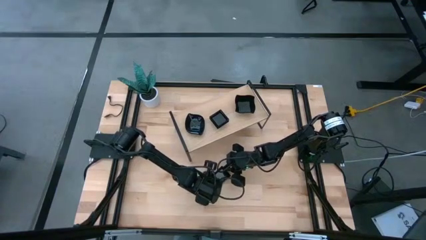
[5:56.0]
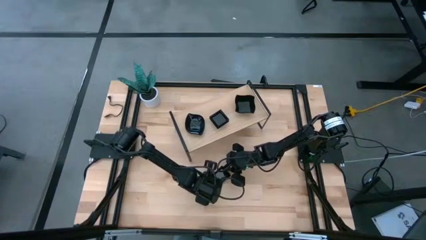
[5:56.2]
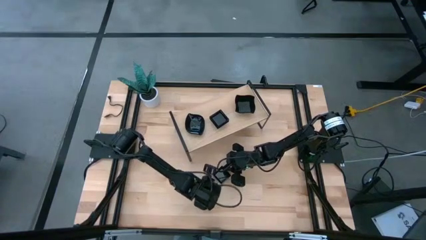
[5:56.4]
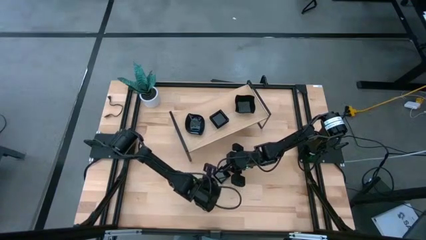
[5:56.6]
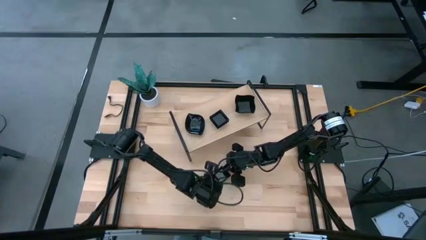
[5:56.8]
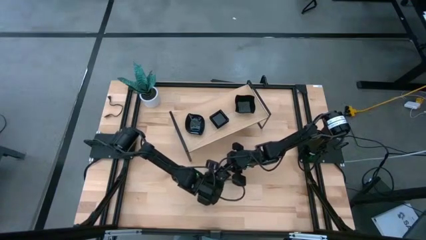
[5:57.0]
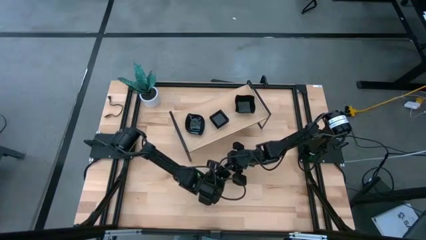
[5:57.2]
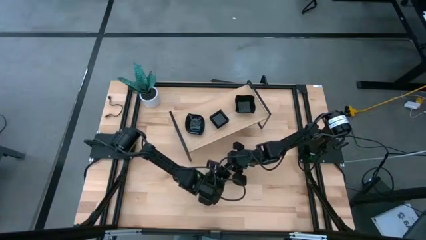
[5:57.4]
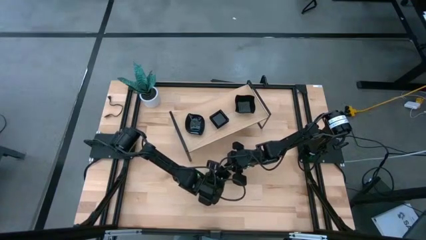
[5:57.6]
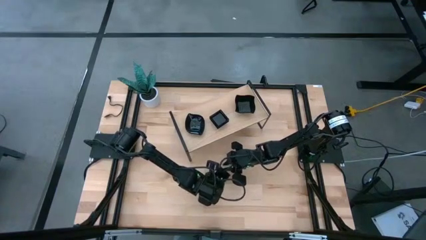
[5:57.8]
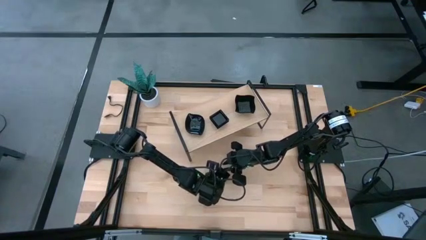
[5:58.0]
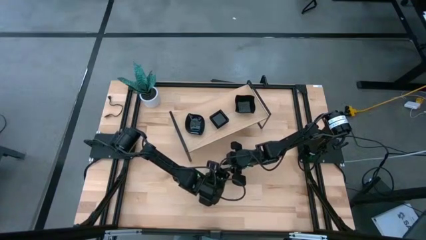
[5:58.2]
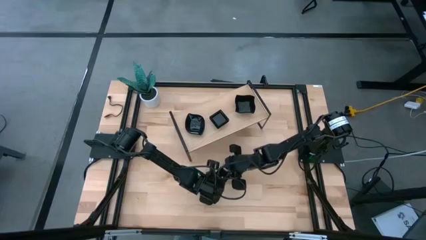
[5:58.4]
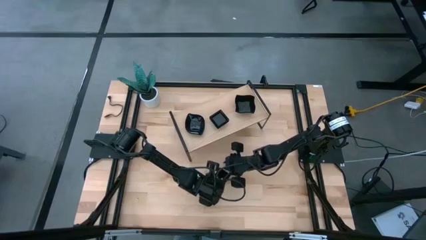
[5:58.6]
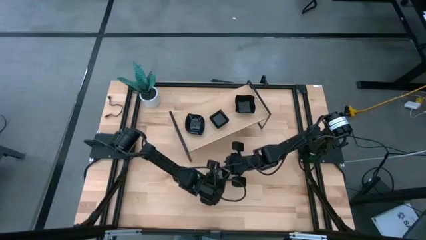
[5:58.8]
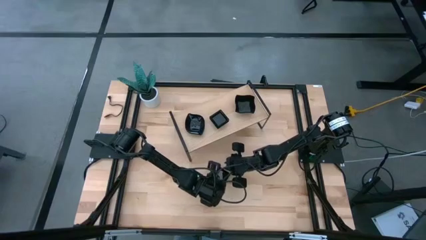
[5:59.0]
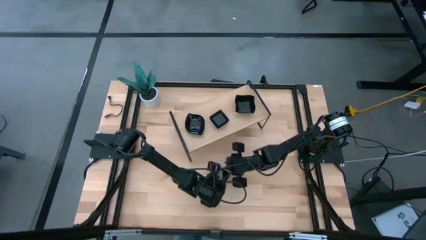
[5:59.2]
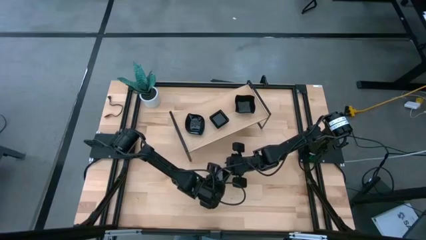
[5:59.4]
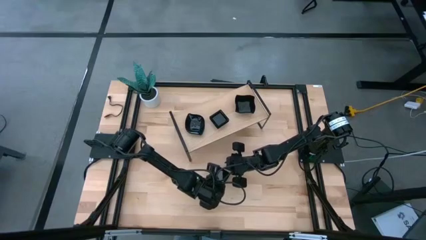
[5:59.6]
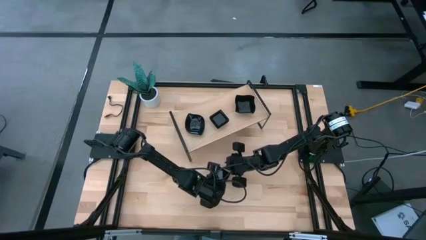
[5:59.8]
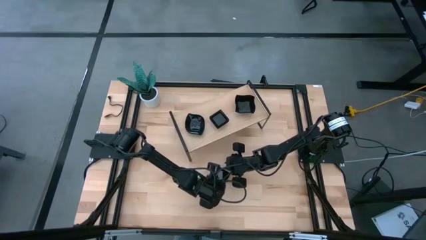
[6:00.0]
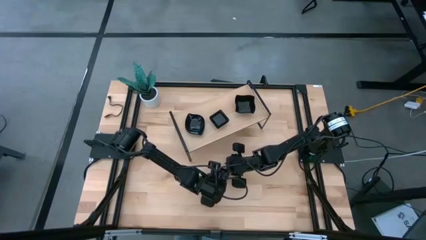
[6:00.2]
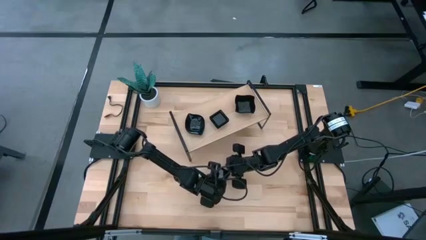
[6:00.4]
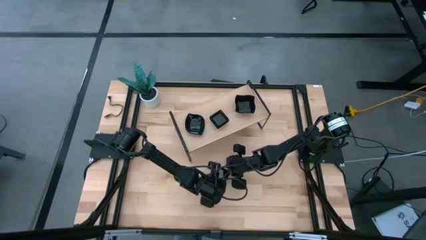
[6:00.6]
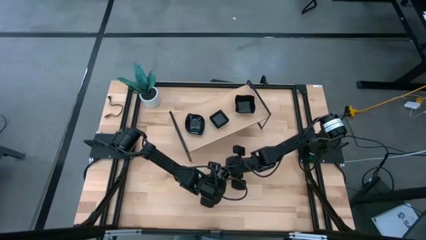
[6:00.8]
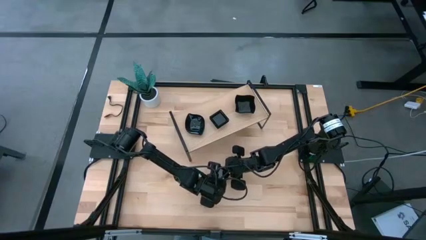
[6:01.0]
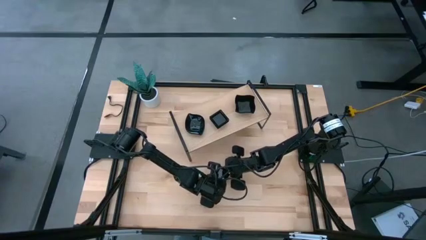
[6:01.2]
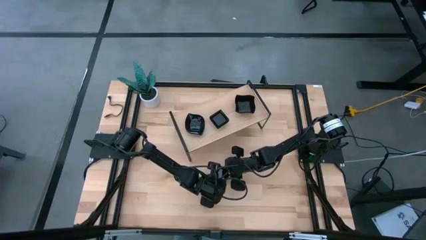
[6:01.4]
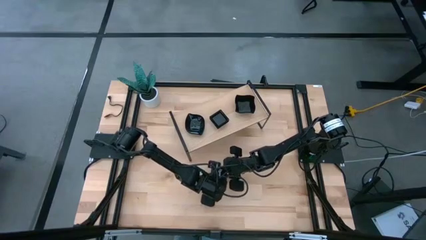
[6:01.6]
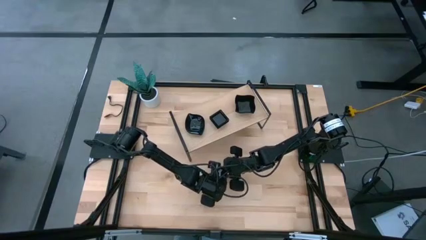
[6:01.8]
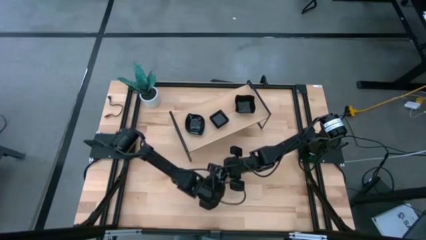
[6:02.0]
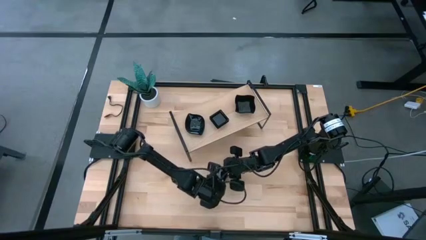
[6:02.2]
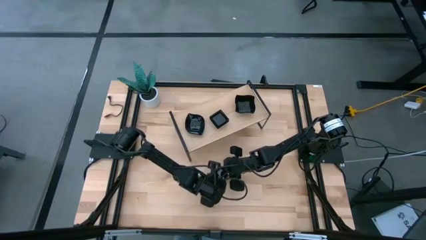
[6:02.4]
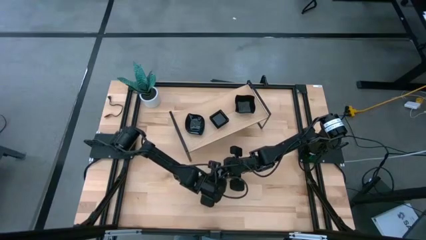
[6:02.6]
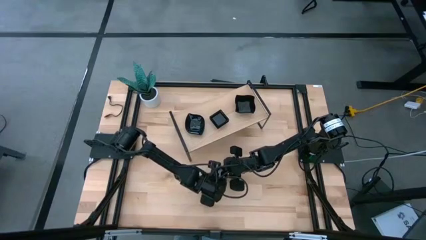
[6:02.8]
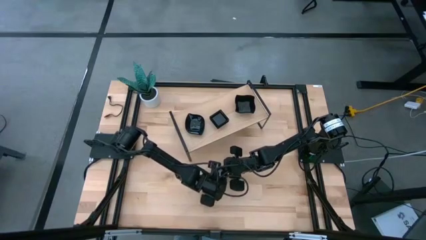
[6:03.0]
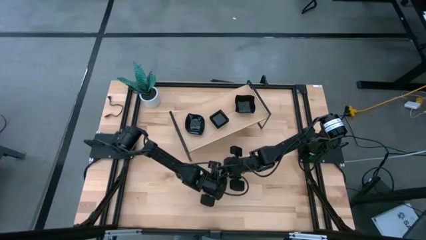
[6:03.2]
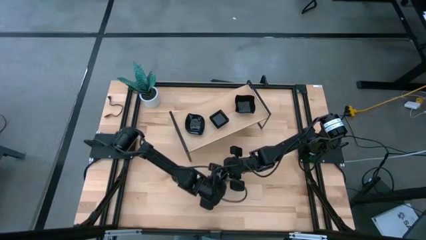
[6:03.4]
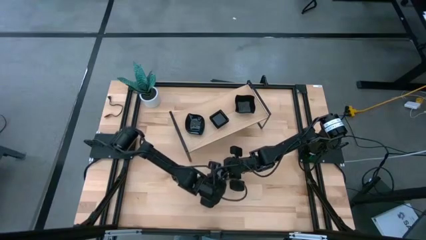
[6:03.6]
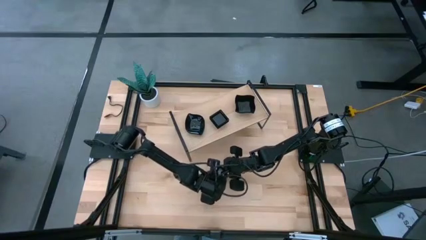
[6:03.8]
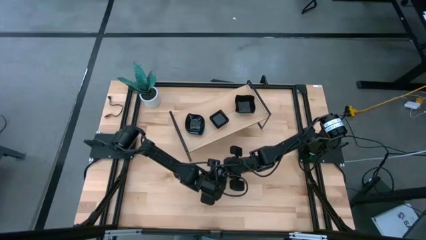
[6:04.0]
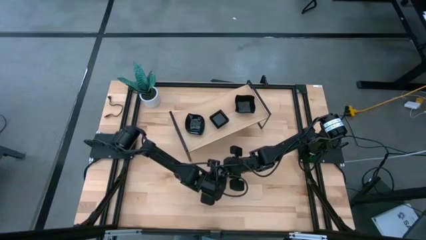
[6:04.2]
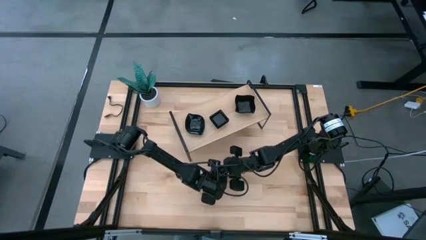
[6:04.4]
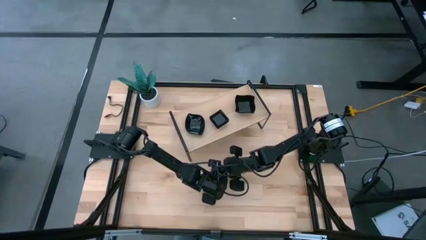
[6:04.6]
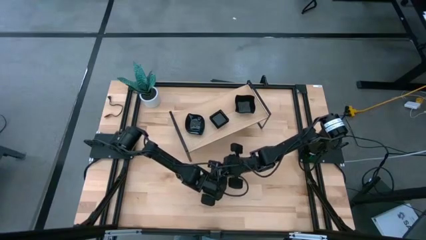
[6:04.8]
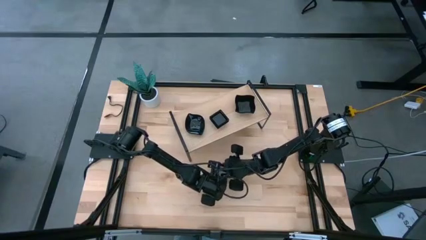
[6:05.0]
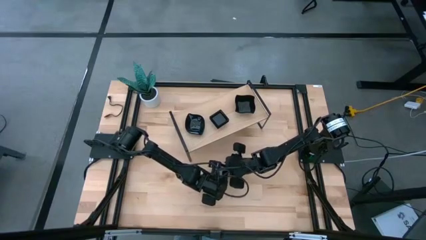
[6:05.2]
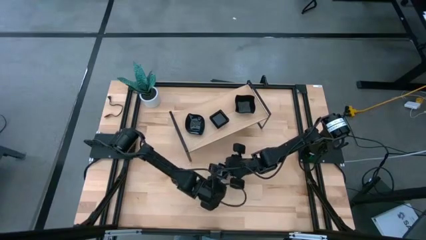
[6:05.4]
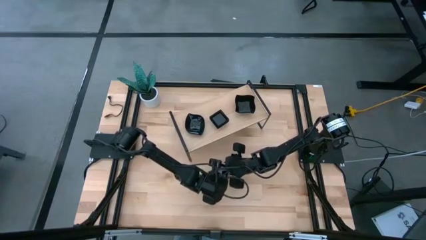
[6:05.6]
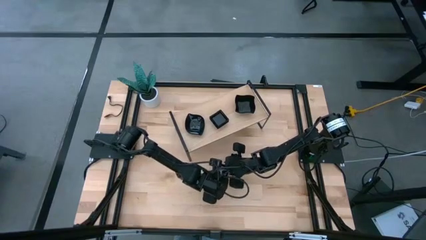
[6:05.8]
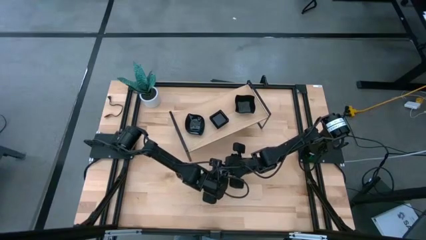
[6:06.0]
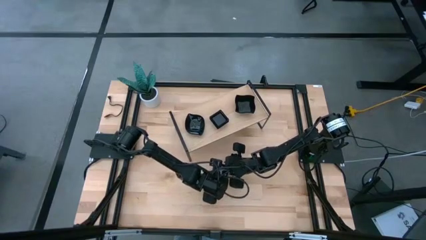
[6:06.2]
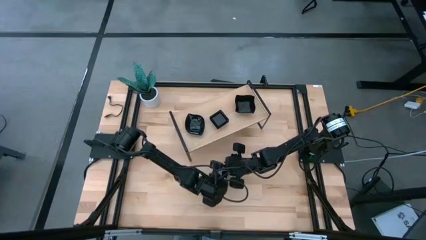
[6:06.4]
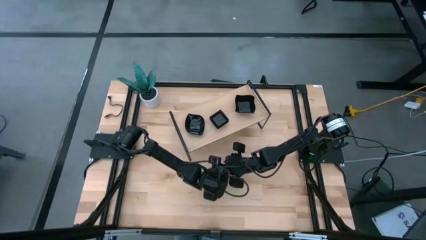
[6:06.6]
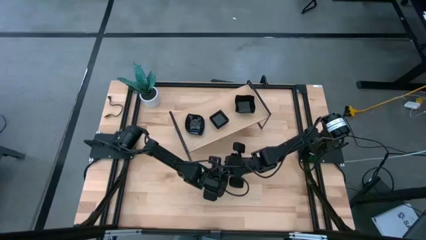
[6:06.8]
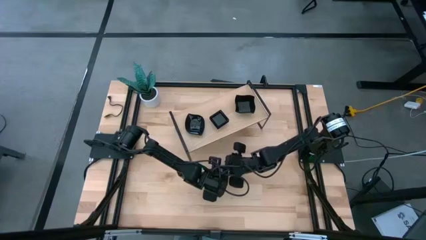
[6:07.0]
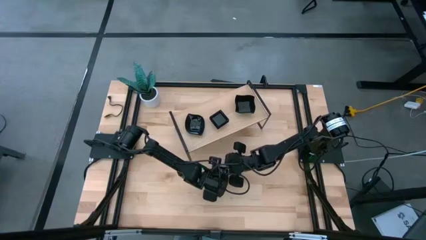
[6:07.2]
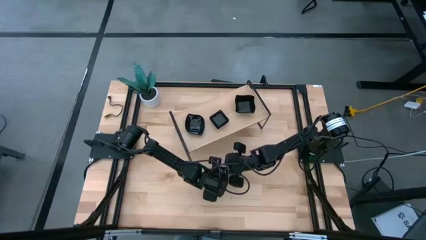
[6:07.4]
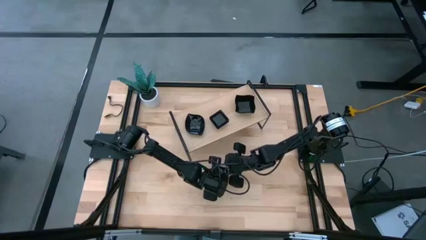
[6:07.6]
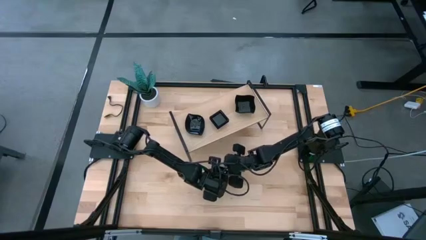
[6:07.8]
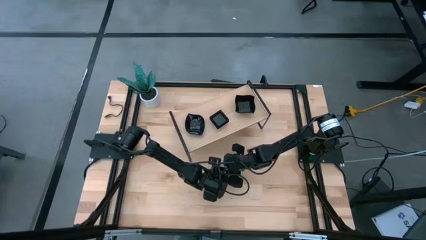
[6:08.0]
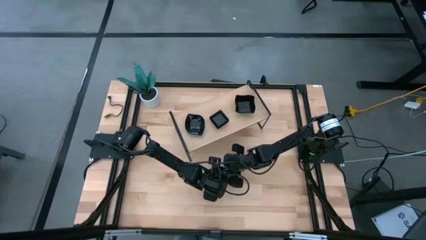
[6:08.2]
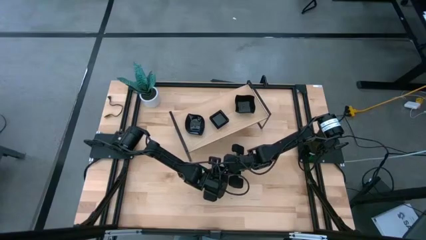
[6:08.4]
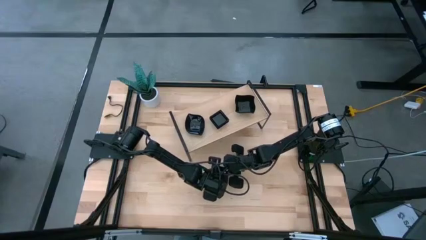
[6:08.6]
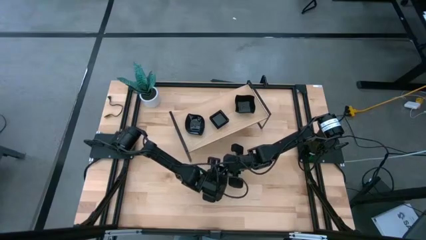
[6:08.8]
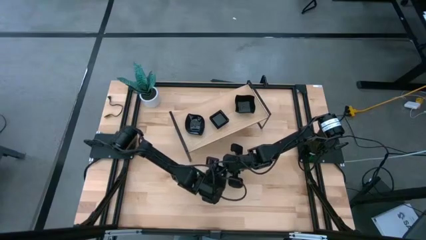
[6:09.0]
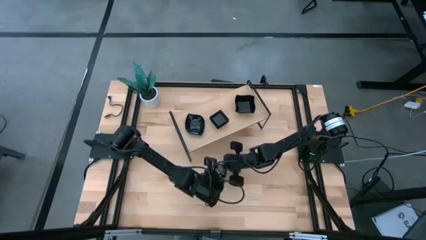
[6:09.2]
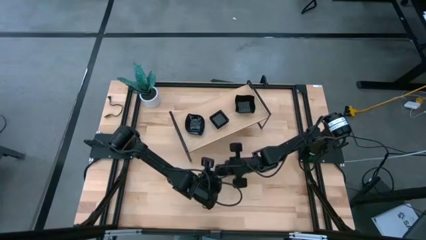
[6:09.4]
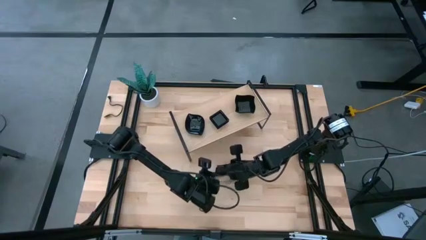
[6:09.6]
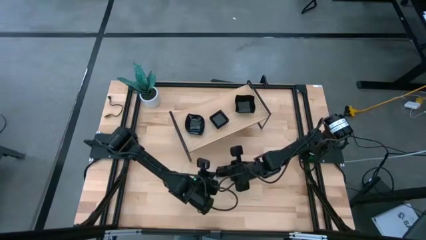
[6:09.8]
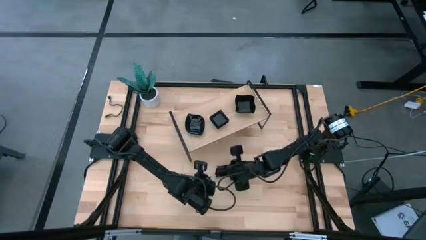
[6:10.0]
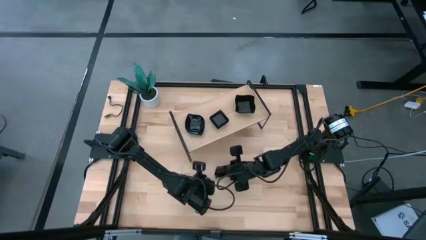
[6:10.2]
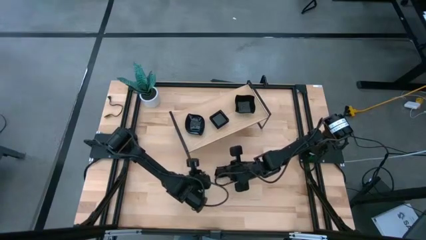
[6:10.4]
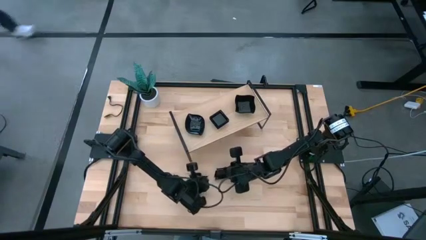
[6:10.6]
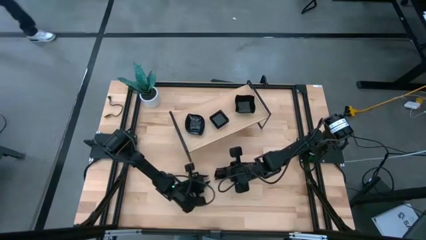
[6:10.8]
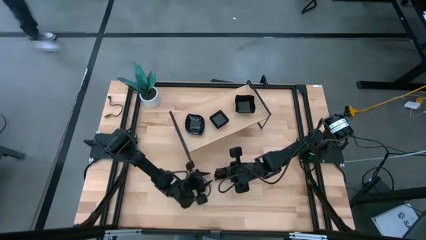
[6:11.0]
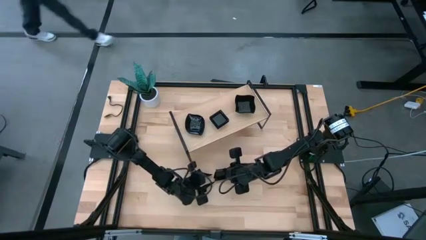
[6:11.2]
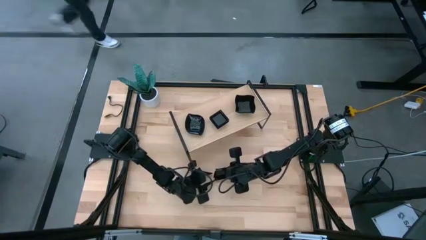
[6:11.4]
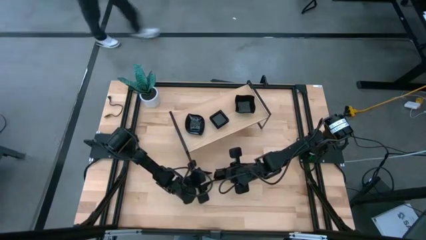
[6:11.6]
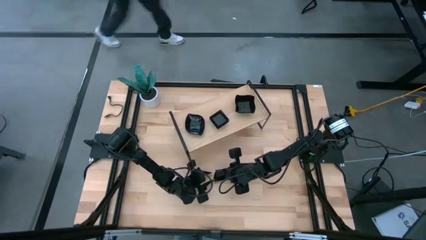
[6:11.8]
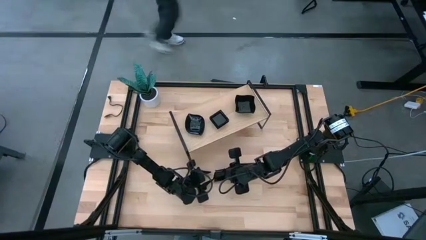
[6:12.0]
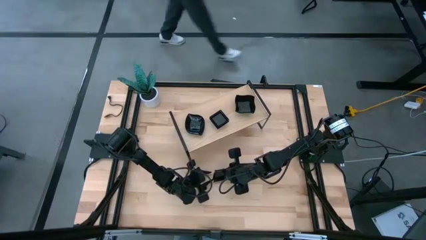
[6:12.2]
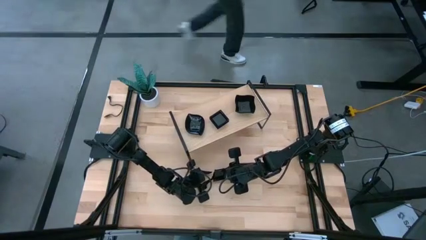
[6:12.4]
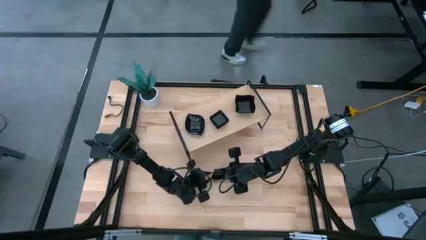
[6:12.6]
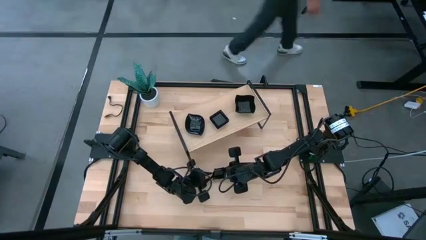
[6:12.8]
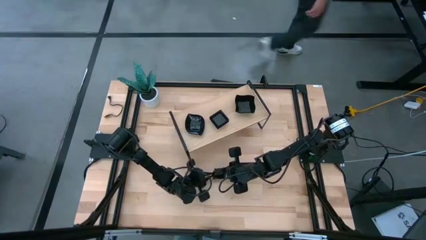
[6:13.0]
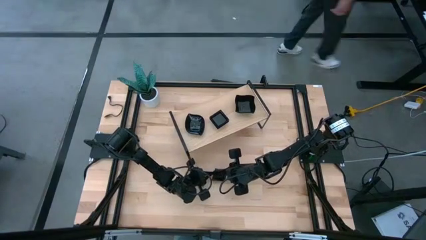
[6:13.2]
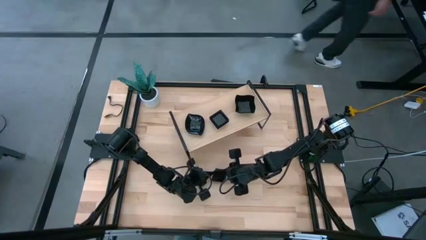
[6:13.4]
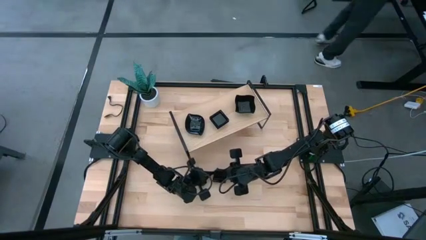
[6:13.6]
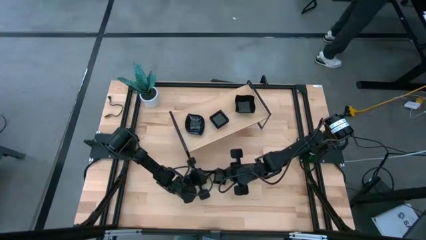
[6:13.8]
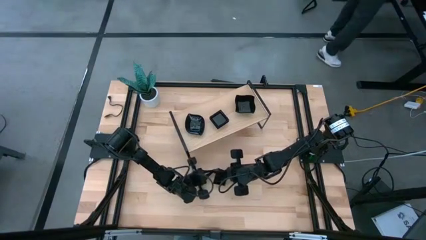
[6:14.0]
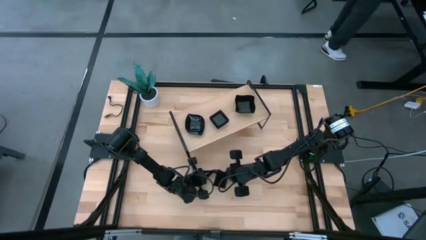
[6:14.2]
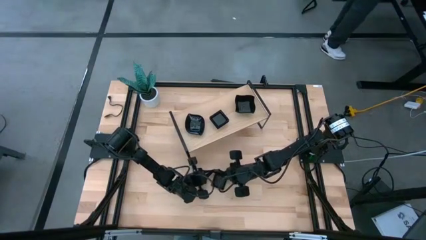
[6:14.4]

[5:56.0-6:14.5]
Task: Pick & Place Mini shaped plates
Stack the black square plate on top of the black square plate on the shelf
